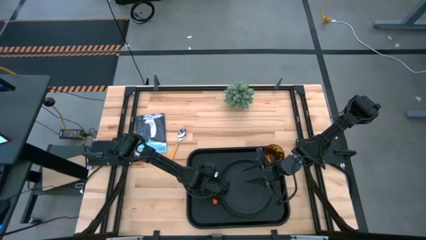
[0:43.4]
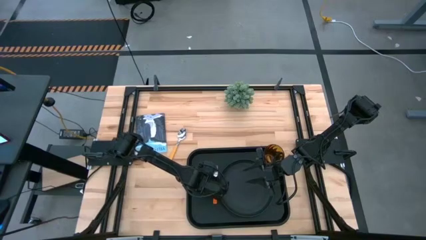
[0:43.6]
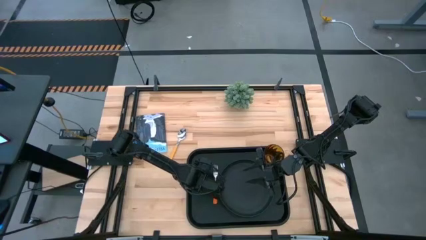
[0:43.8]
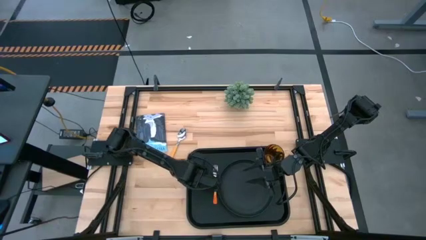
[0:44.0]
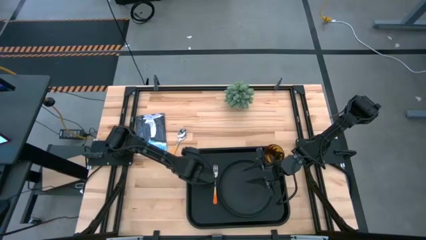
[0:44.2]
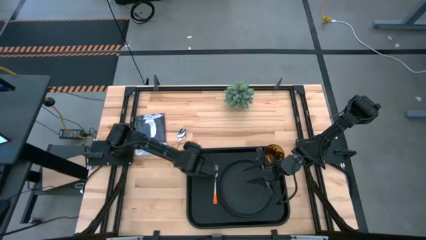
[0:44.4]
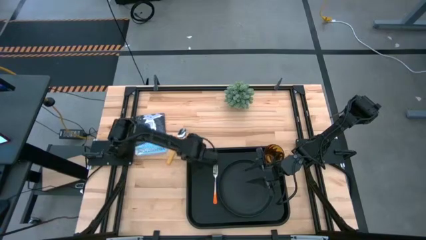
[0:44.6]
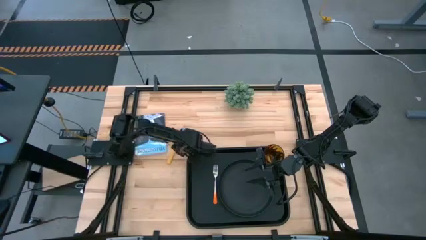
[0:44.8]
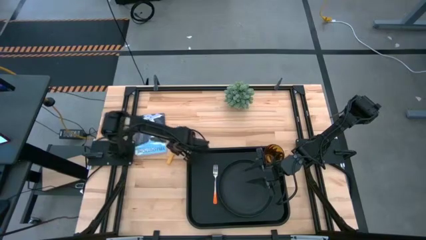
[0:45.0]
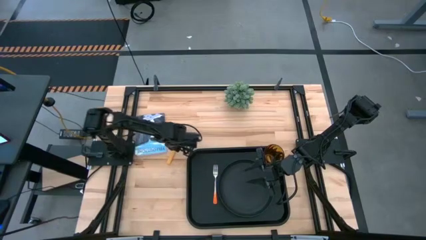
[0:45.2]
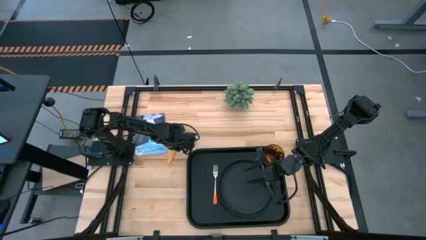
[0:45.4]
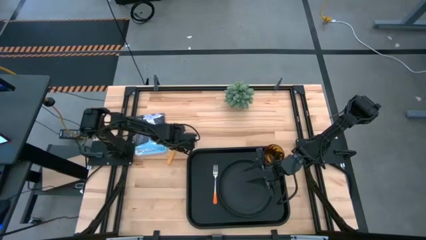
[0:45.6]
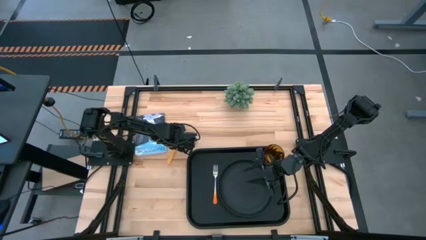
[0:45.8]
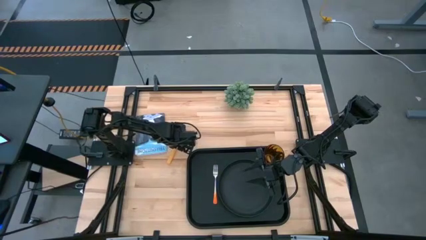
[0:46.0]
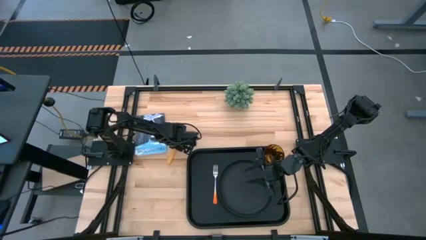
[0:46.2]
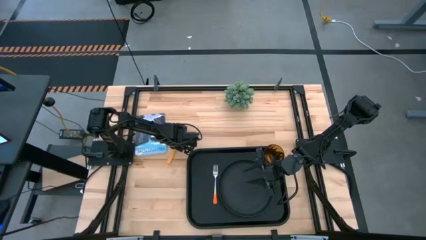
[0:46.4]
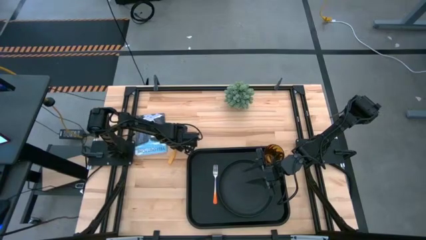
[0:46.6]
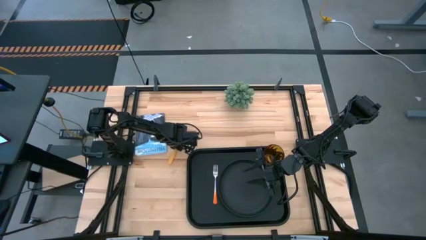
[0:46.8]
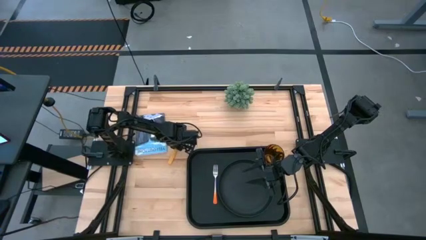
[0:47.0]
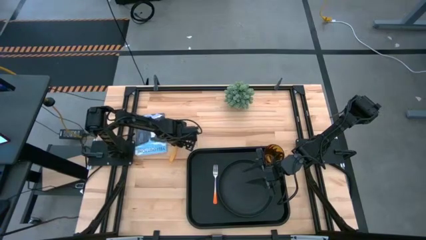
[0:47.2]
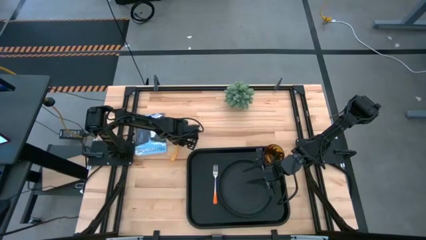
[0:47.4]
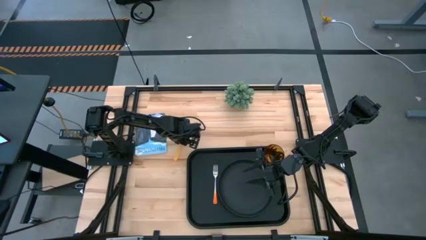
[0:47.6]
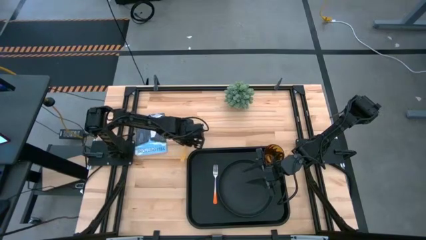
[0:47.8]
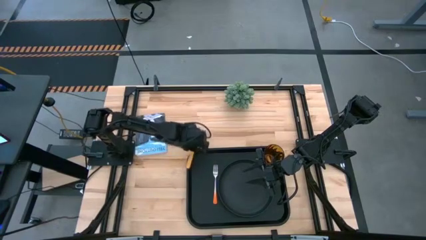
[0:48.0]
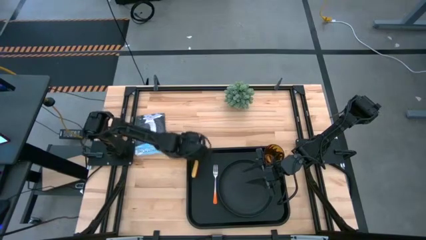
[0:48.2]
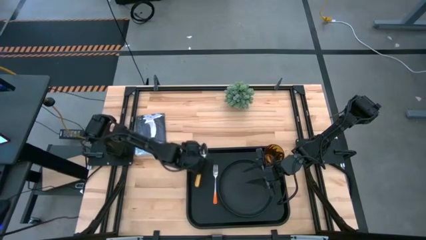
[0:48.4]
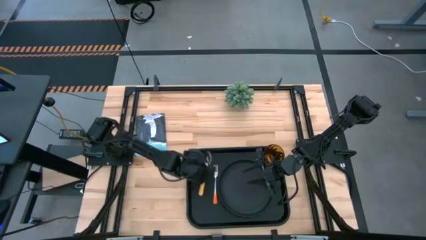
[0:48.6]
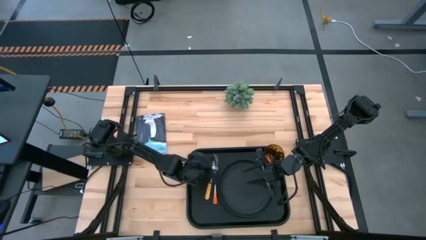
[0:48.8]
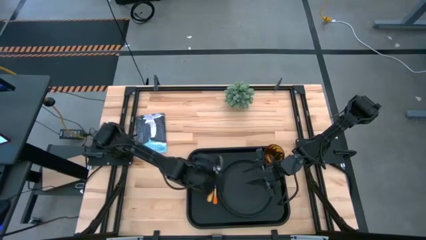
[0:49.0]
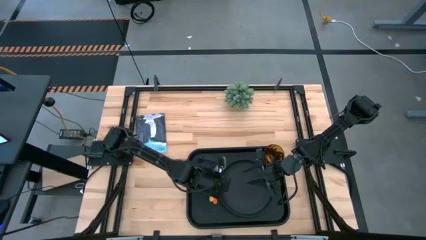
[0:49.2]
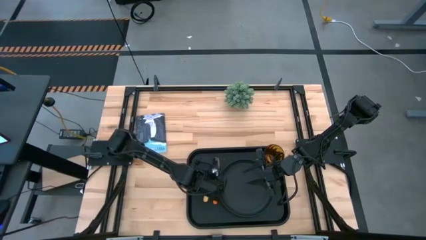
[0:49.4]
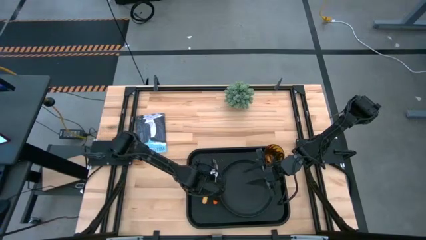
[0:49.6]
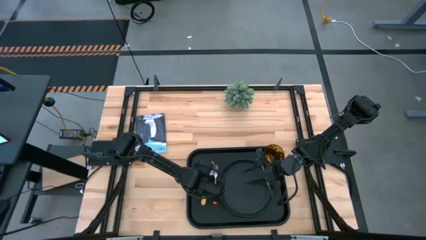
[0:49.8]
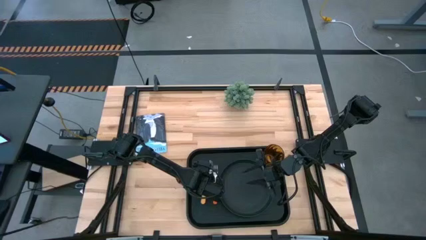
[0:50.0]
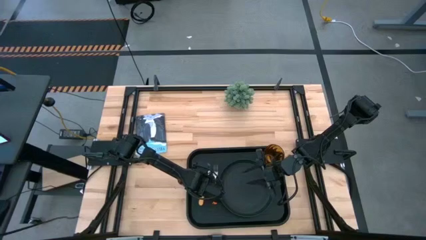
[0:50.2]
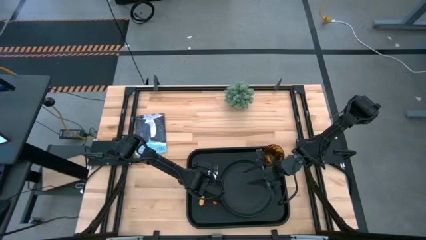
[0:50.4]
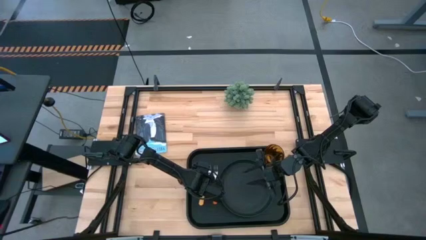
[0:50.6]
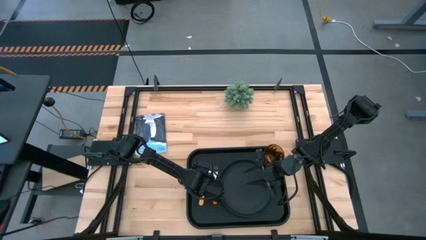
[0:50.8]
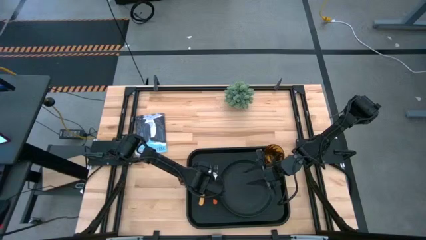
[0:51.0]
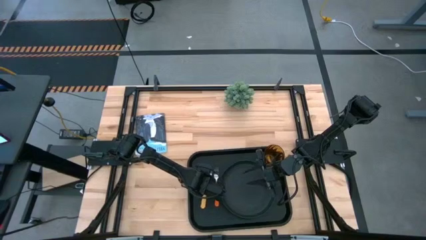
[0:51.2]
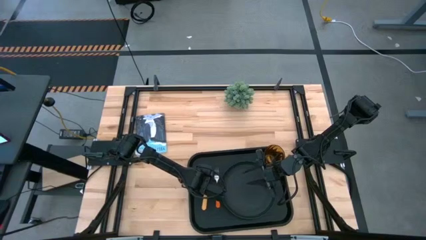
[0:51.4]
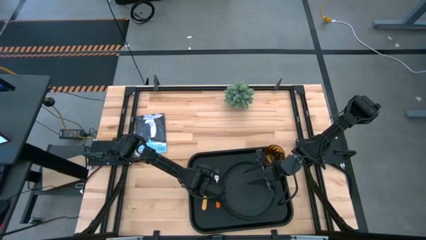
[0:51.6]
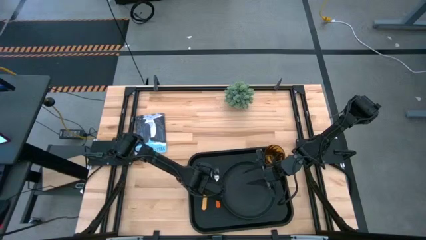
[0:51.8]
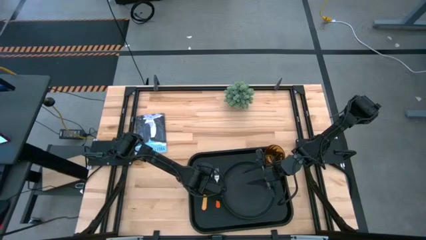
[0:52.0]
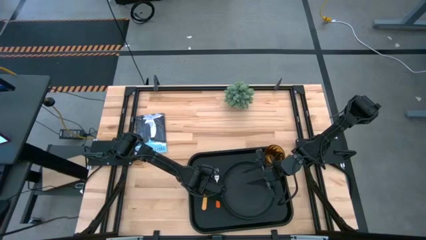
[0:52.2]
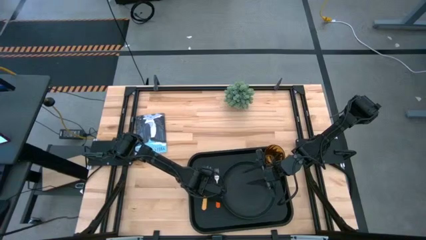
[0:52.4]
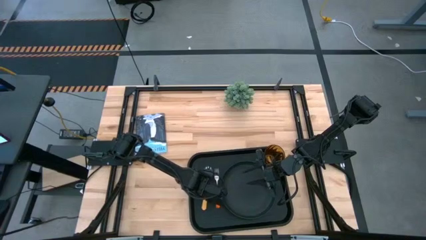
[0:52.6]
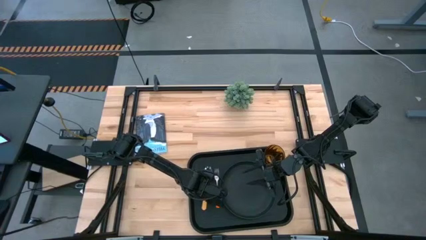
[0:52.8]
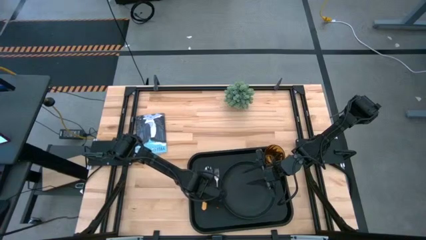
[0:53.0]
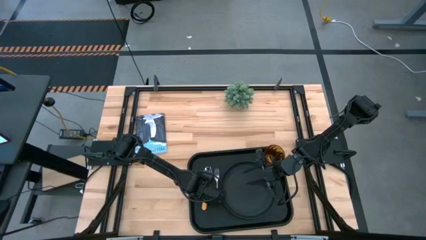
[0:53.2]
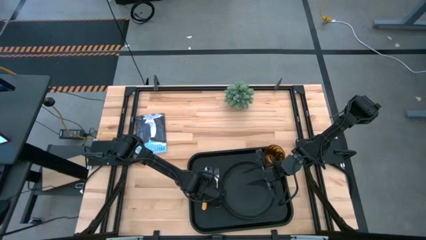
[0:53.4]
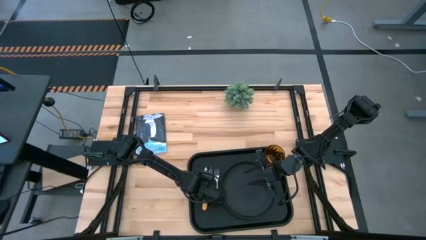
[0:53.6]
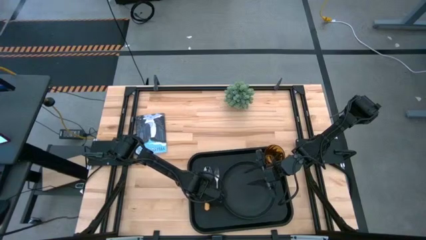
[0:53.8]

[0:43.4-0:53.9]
Task: Pick and place plate/cup/fork/spoon on tray
Put the orange spoon to the left of the orange fork on the black tray

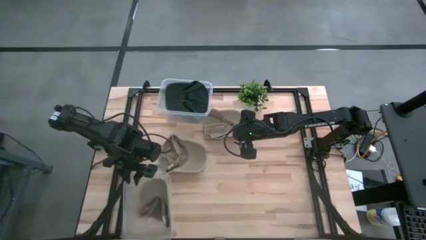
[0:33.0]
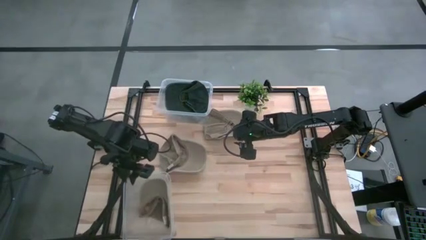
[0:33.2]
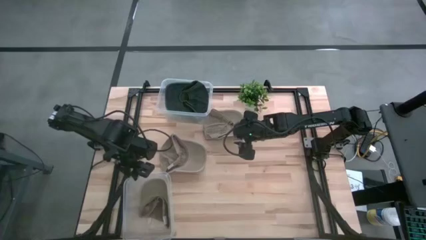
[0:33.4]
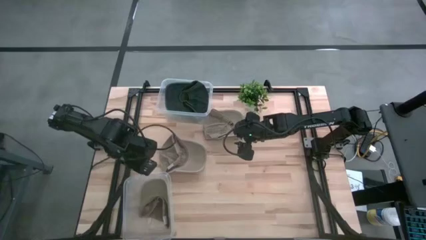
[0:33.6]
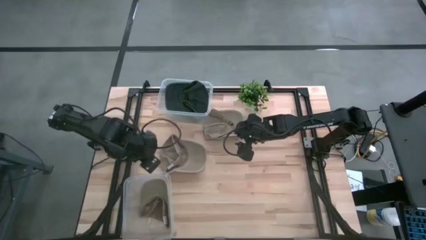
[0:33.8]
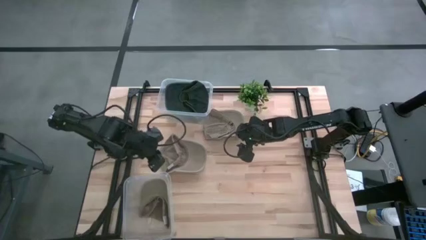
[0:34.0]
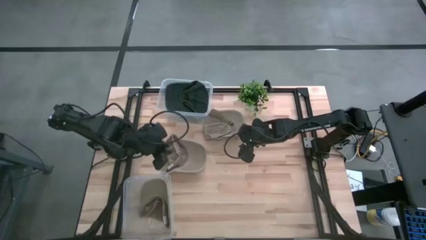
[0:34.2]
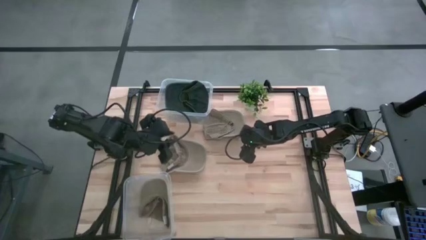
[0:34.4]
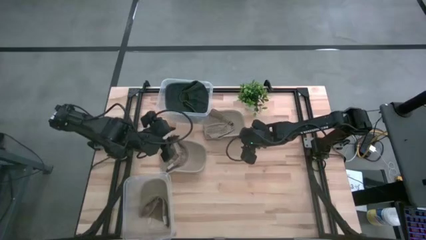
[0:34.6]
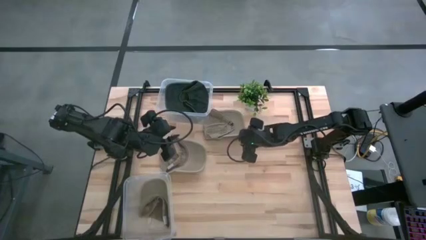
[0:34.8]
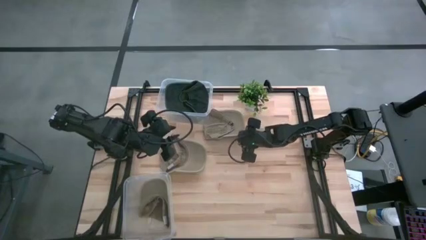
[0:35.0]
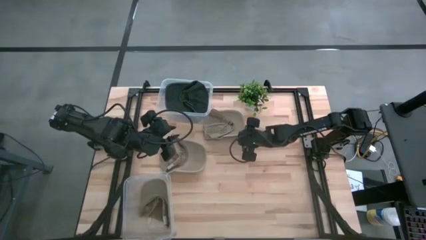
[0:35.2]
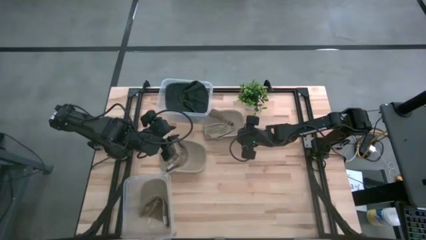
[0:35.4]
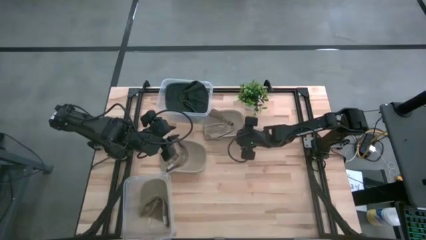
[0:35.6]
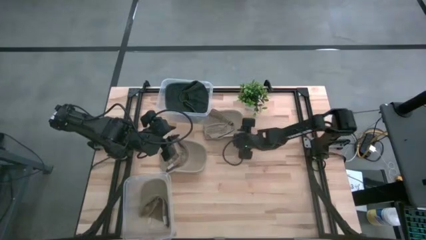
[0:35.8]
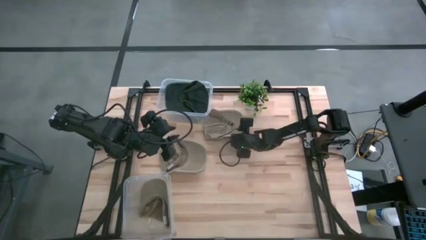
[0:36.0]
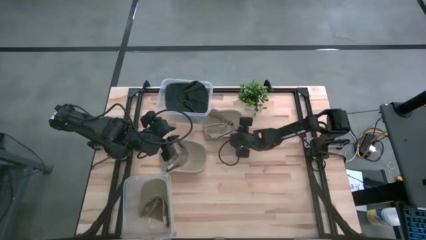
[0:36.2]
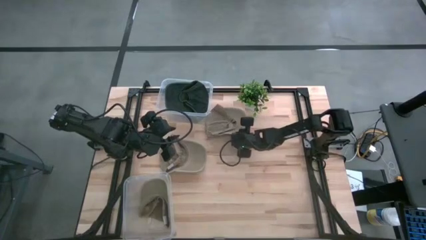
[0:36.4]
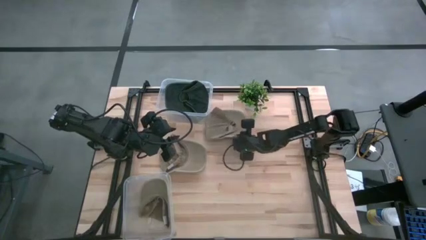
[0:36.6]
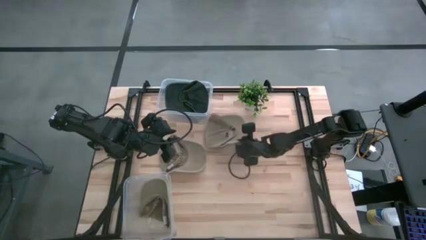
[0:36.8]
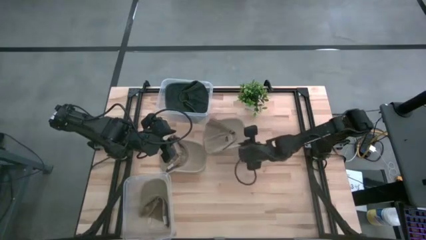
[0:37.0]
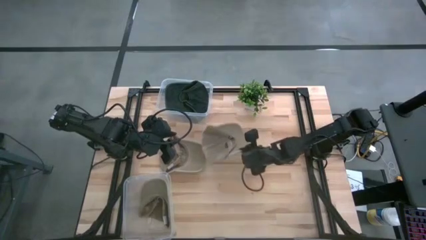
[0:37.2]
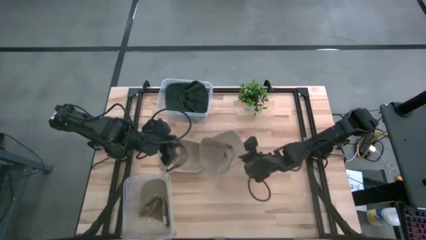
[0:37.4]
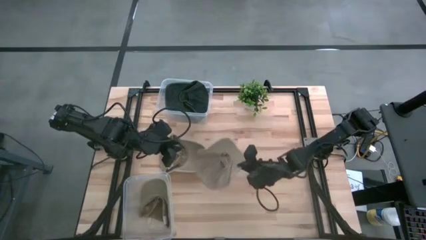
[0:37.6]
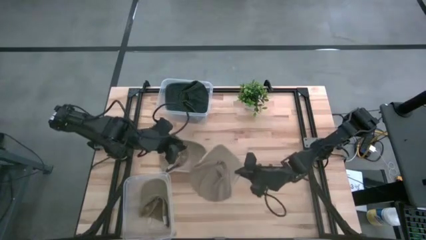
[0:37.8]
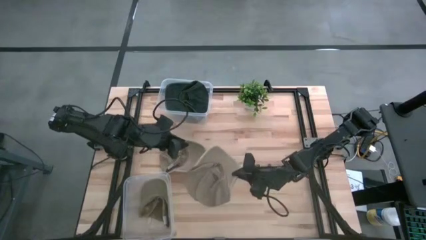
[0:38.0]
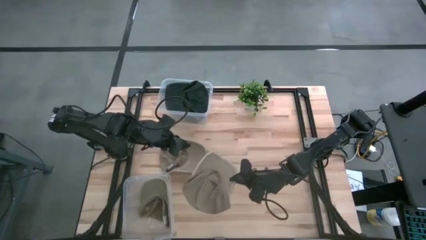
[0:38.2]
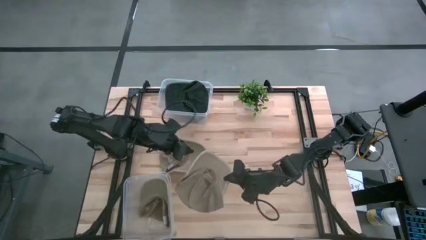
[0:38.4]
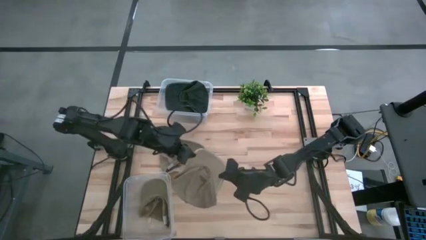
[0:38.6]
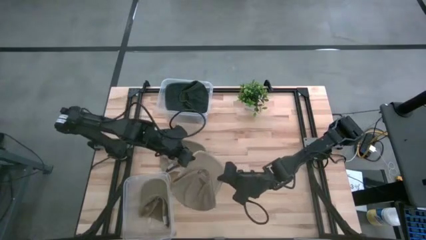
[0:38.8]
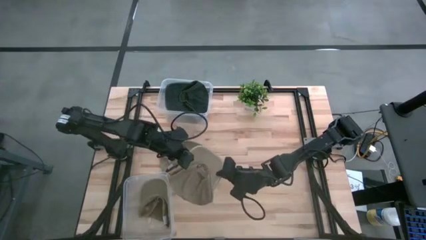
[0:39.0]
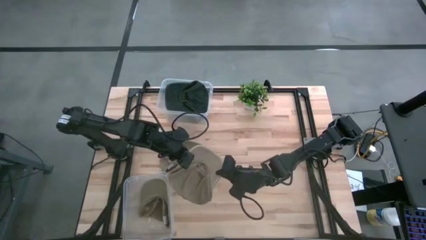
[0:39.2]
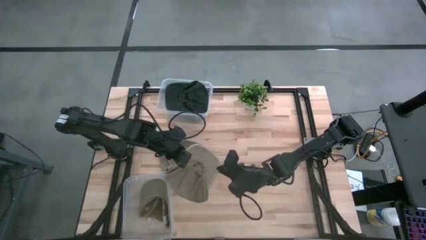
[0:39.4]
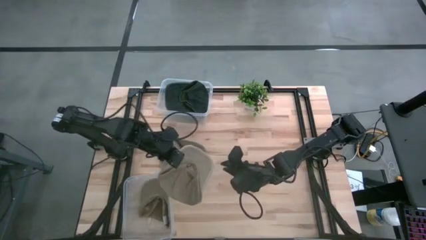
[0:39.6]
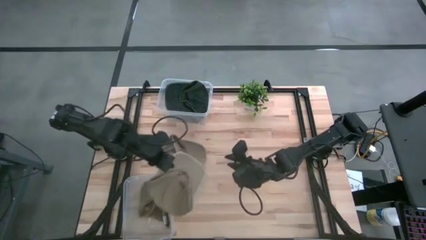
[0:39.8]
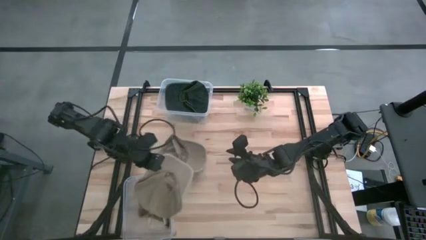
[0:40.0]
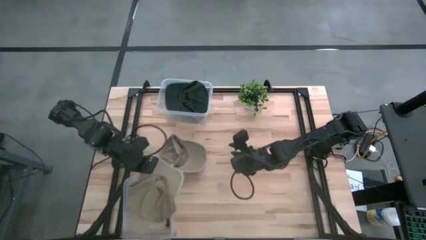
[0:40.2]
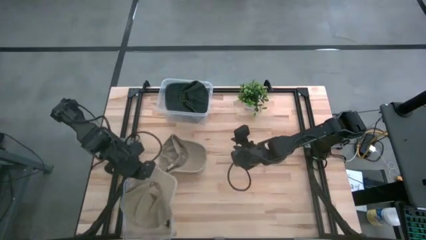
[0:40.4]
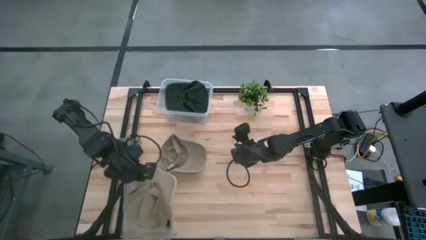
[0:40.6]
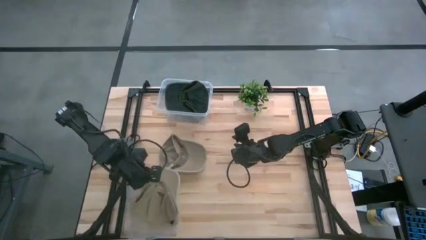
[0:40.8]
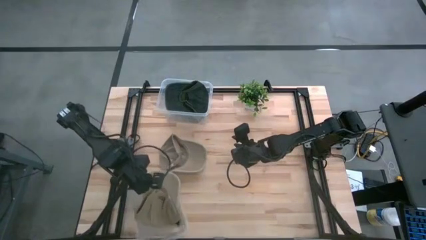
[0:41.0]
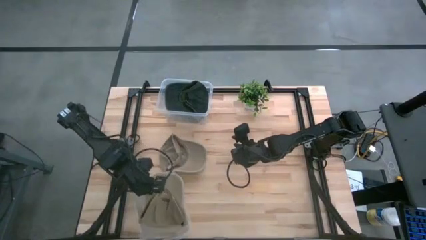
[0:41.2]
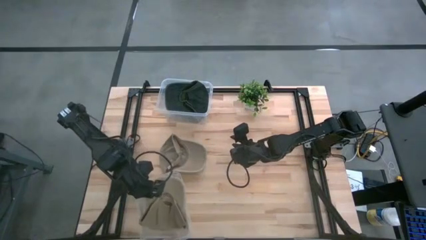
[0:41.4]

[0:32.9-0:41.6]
Task: Pick & Place hat
Put the top brown cap in the bottom transparent bin
